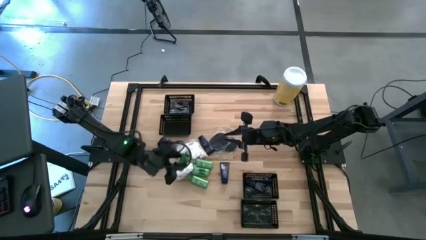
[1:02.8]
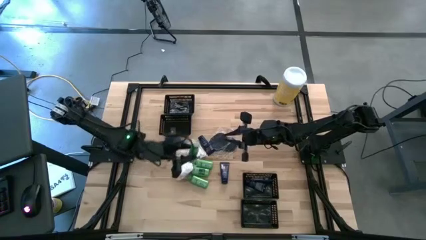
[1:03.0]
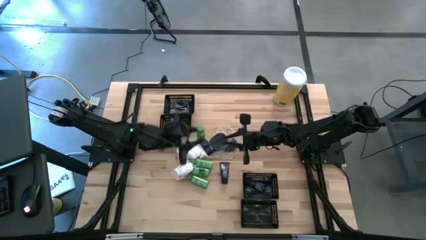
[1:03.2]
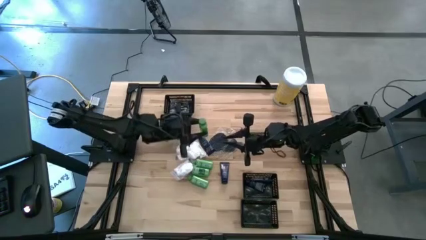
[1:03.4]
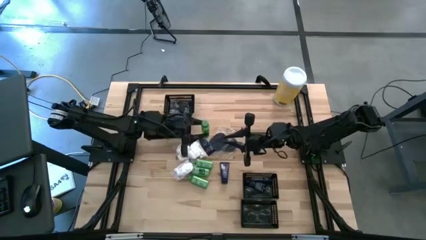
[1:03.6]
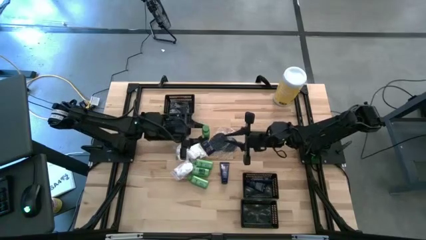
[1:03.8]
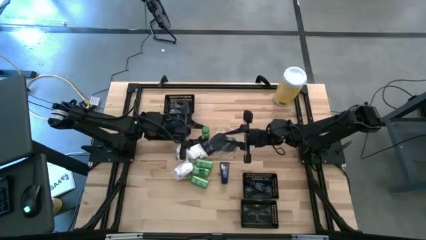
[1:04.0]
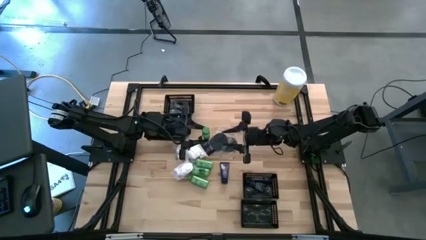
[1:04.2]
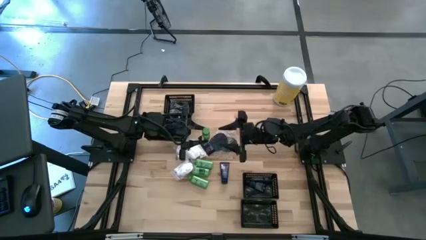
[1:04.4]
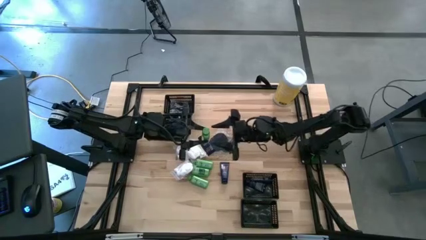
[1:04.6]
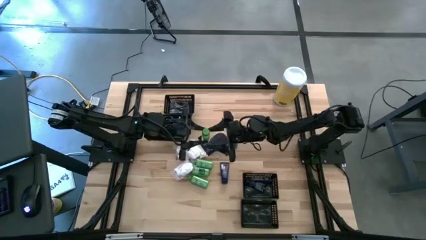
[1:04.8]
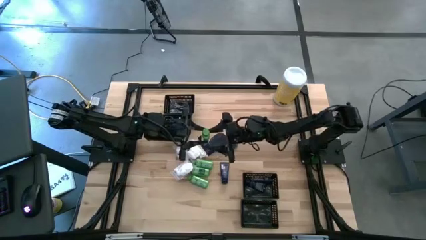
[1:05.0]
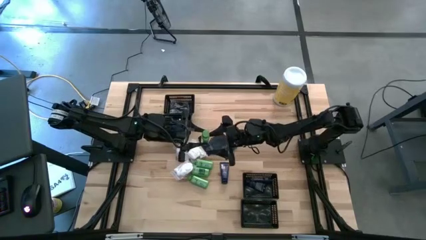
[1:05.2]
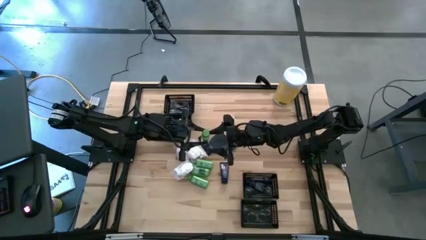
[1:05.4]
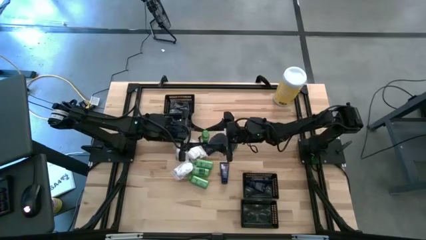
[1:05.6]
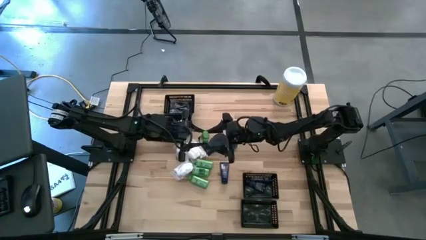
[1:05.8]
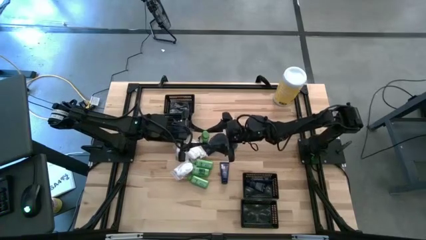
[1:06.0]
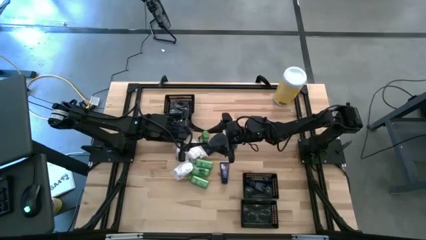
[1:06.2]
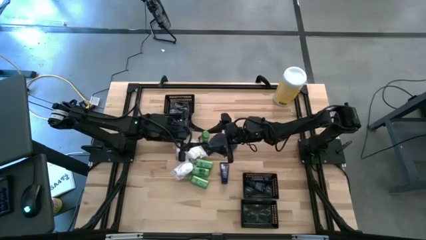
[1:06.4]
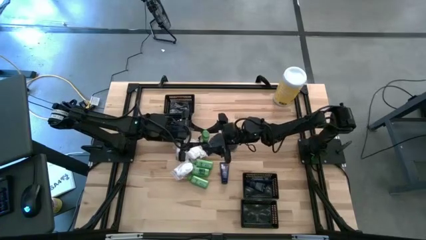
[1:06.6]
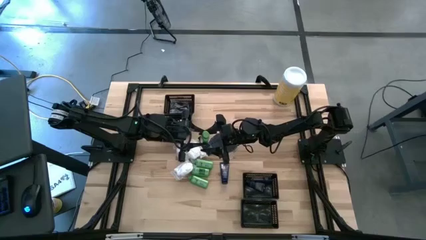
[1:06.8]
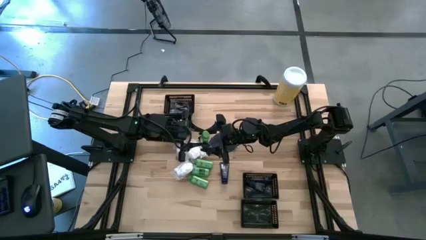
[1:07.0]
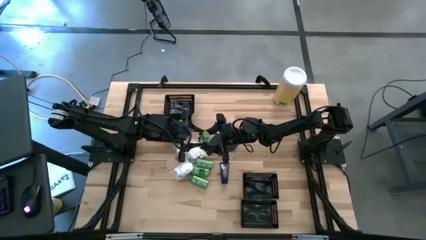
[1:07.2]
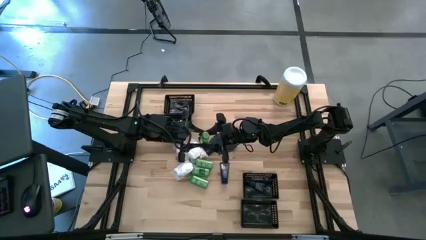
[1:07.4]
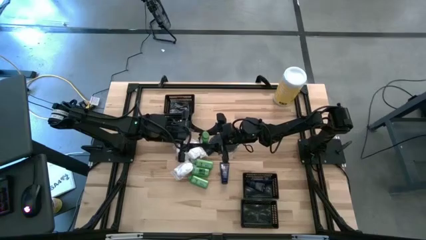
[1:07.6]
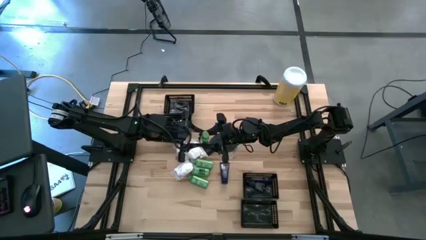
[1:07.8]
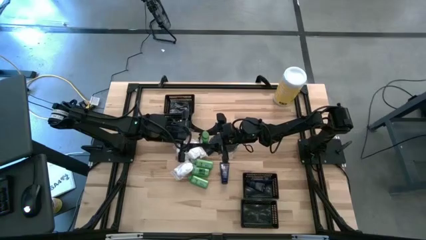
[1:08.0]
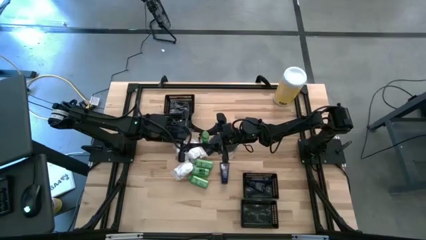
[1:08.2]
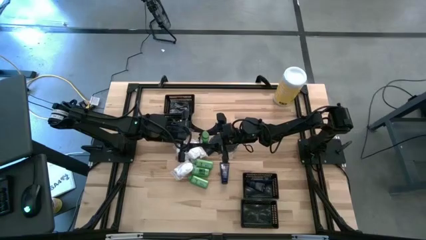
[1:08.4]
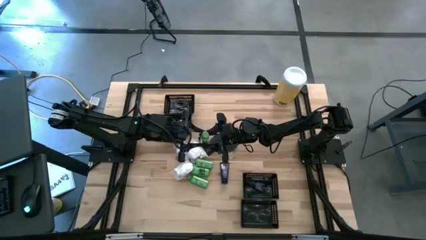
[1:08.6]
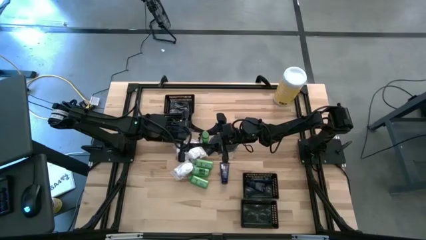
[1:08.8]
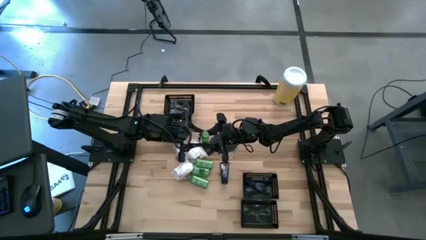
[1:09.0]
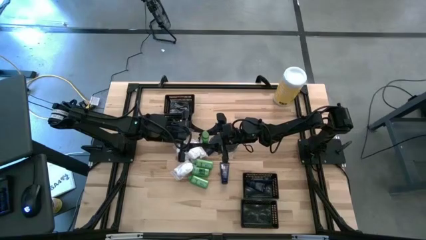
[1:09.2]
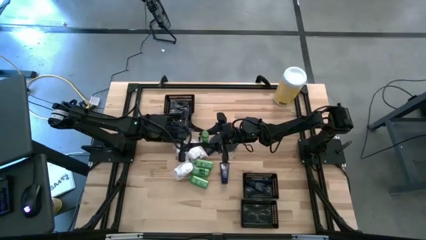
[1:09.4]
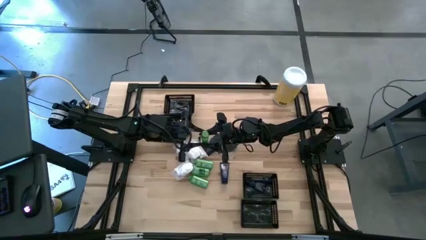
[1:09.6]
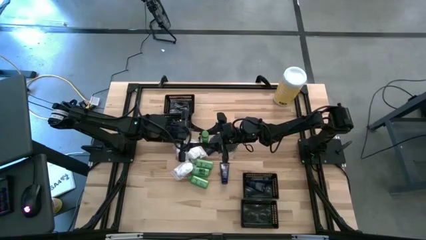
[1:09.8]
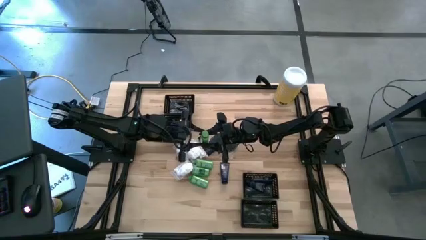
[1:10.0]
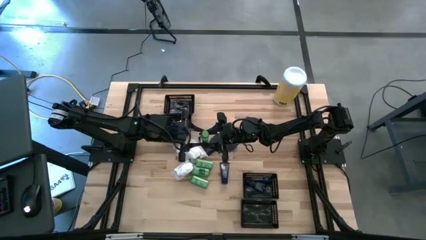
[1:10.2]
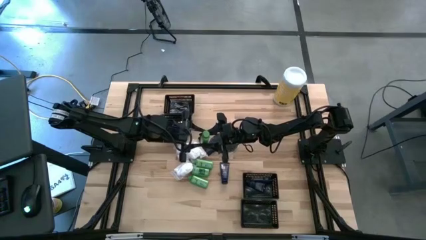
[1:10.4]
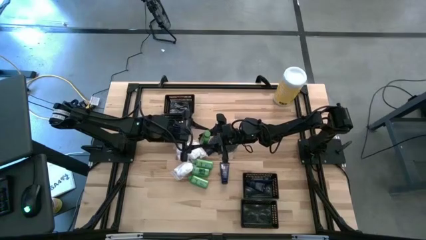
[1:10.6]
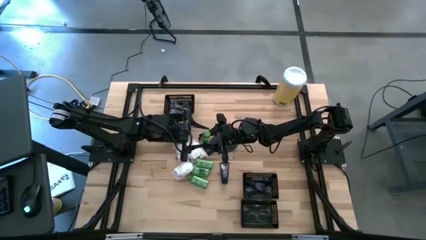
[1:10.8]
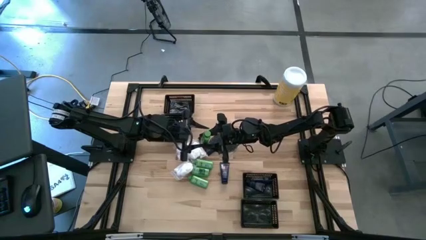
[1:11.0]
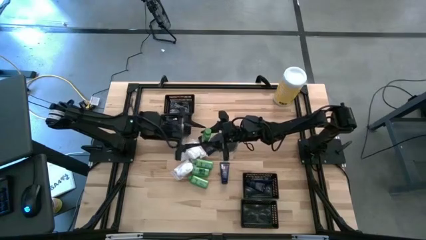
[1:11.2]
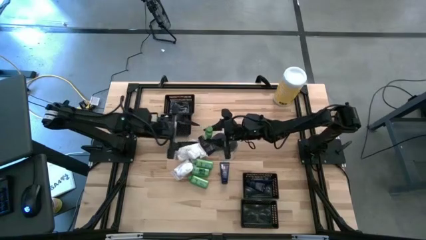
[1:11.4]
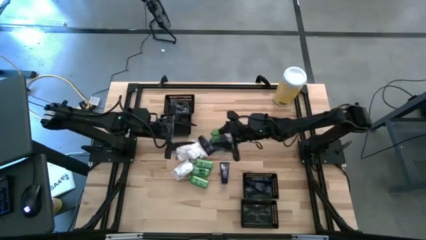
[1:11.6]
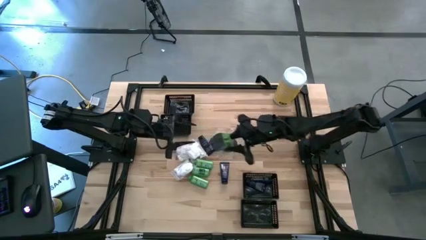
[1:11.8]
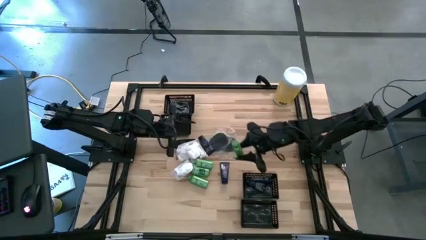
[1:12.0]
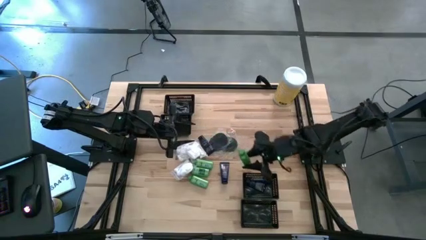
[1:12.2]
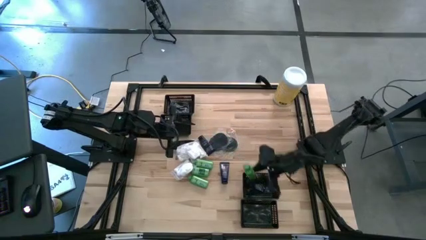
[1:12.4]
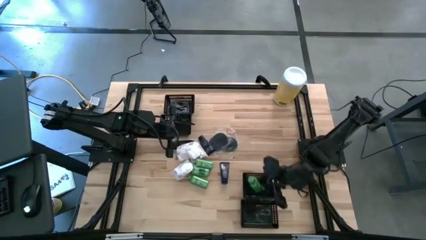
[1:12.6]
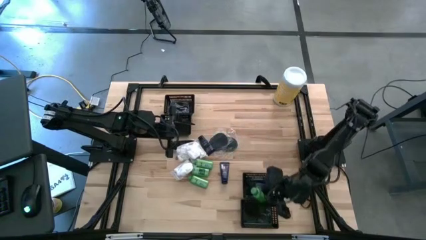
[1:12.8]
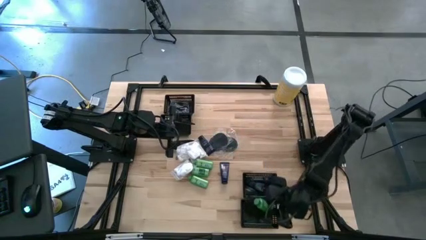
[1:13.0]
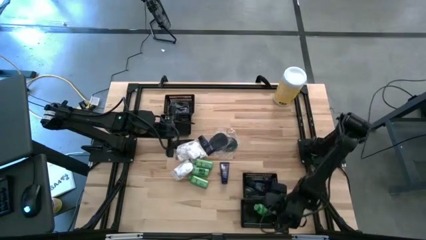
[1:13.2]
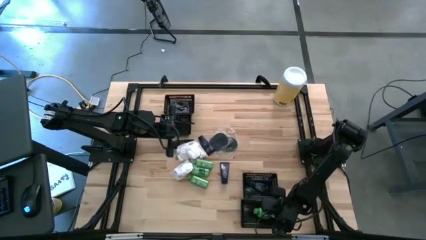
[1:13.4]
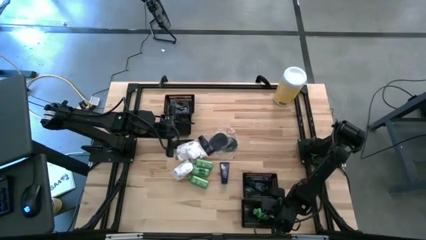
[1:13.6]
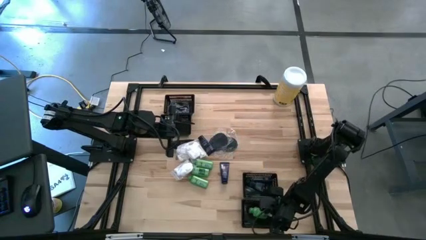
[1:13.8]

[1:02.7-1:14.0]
Task: Pick & Place Travel size toiletries
Put the green shampoo into the bottom black basket
